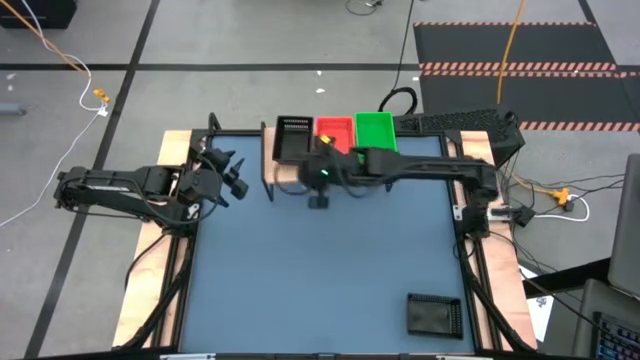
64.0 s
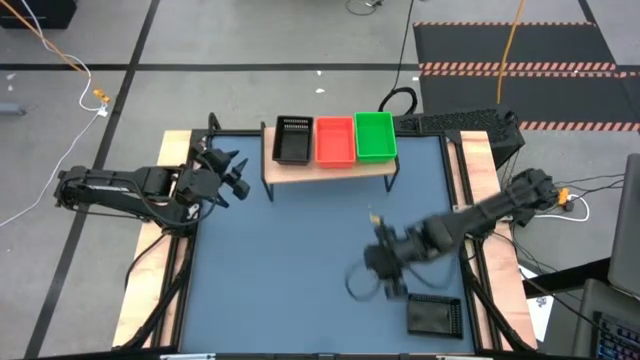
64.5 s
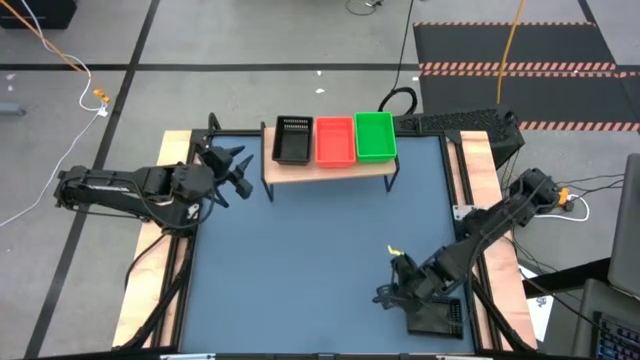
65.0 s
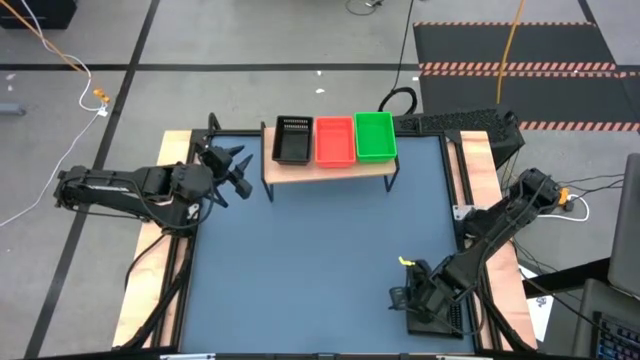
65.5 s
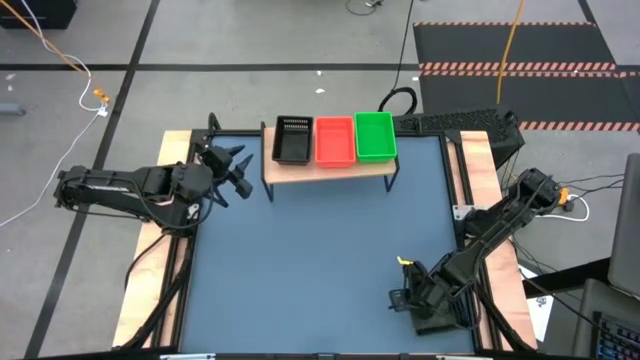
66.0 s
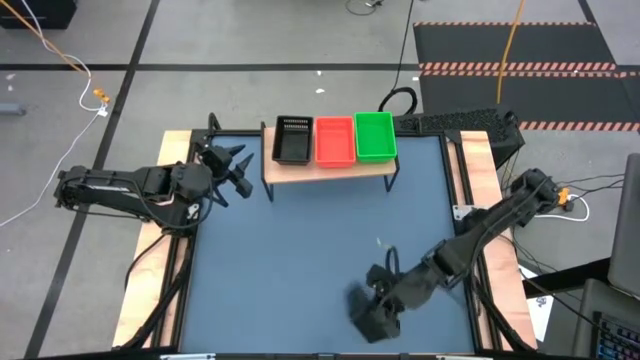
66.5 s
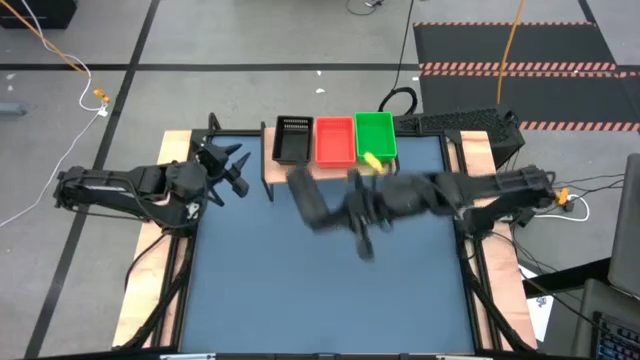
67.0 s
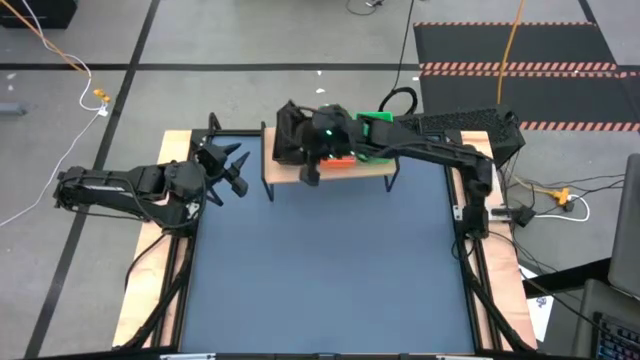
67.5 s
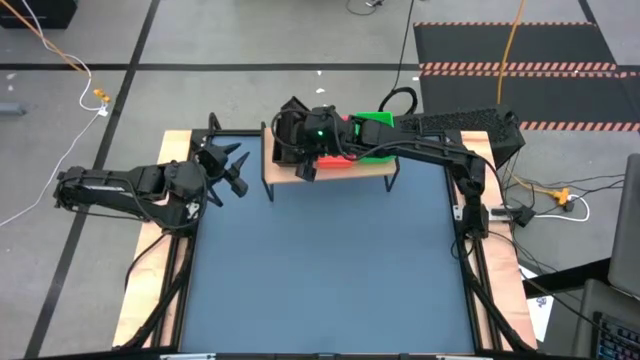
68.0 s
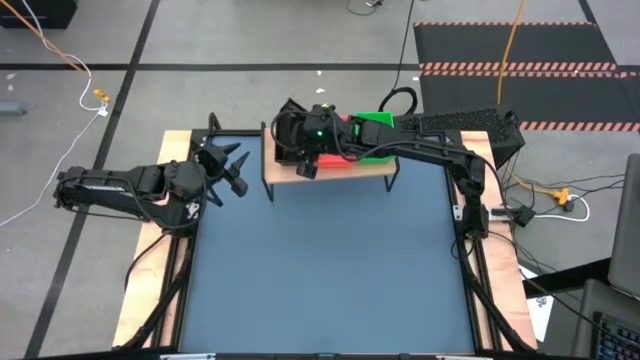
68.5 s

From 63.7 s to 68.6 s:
Task: Stack baskets on shelf by color
Stack the black bin on top of the black bin on the shelf

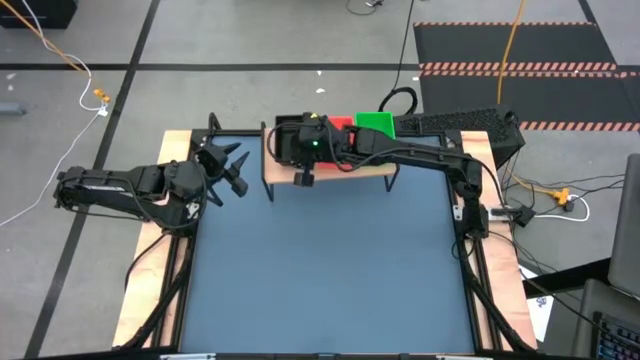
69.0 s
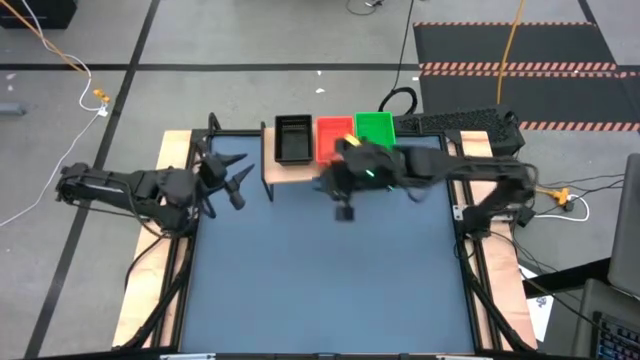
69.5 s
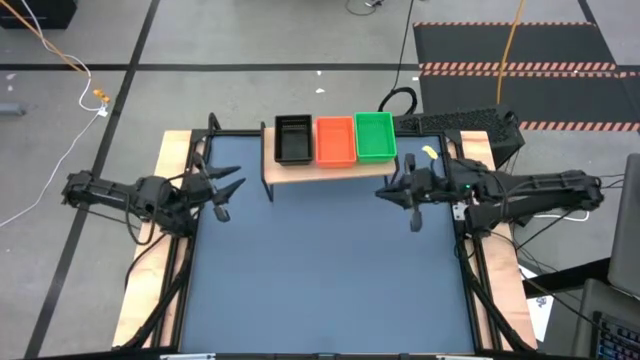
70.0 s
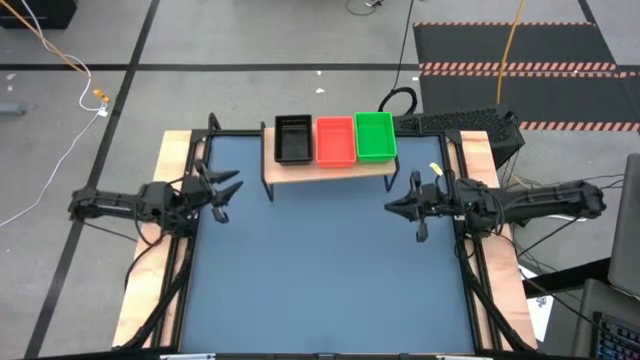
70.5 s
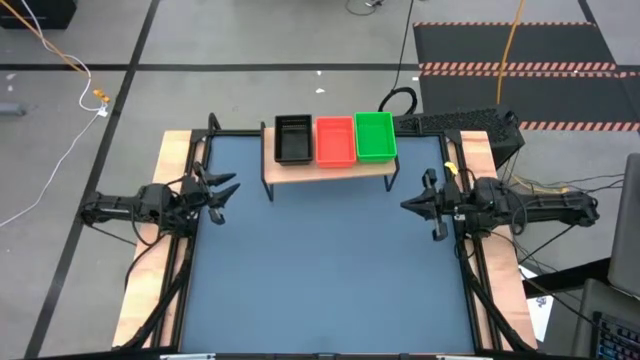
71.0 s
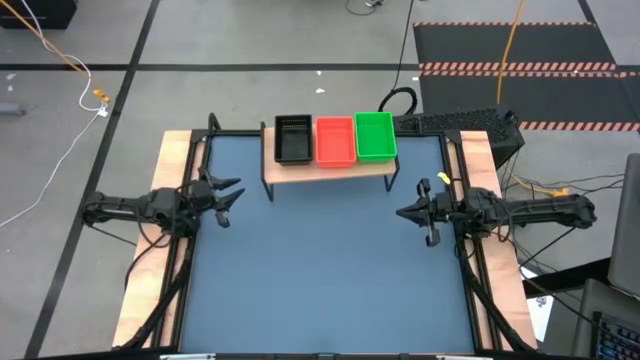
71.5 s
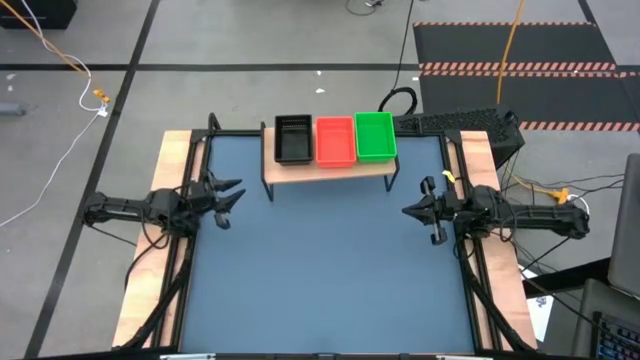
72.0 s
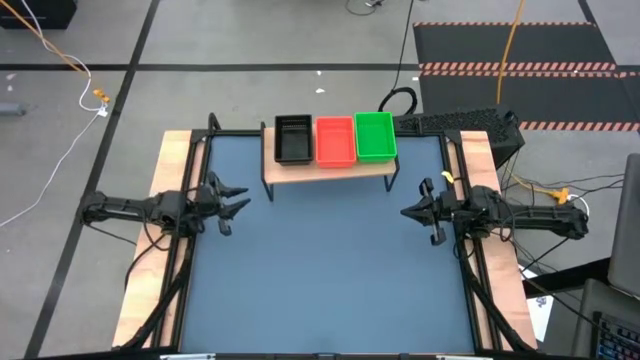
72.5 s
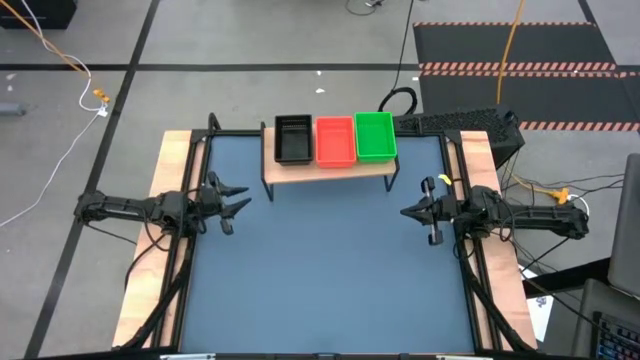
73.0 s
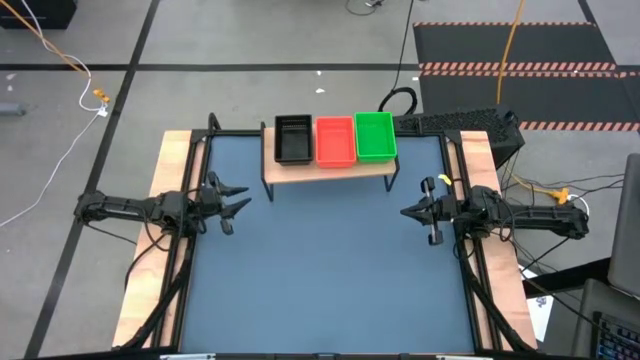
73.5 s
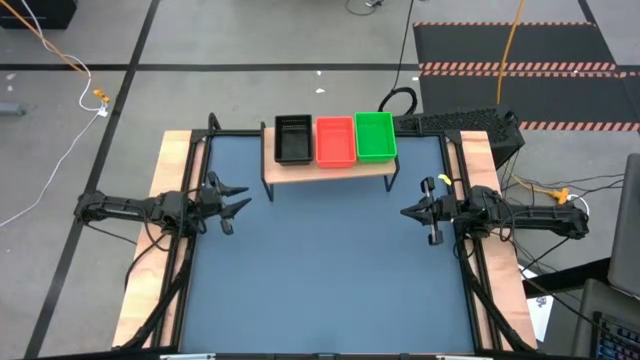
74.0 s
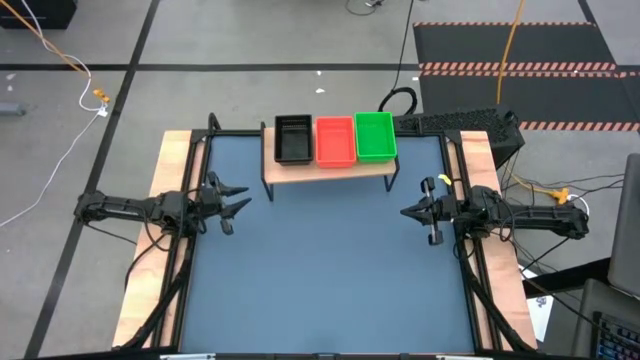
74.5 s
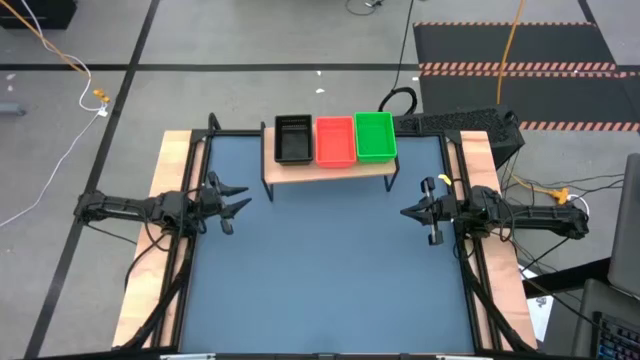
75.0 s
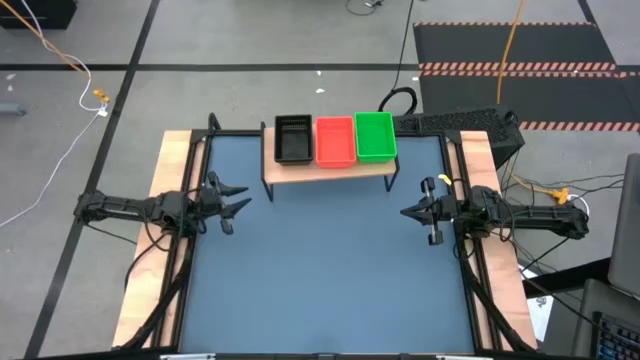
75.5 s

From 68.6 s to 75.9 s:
Return to Home Position

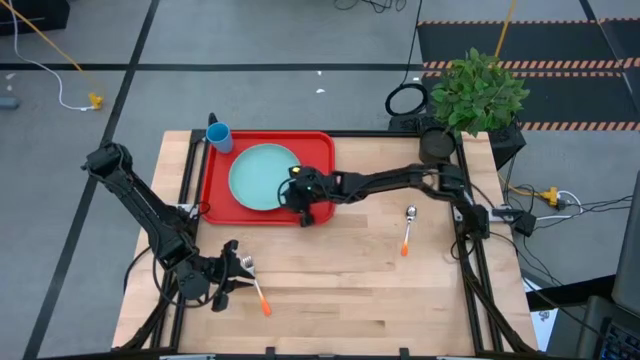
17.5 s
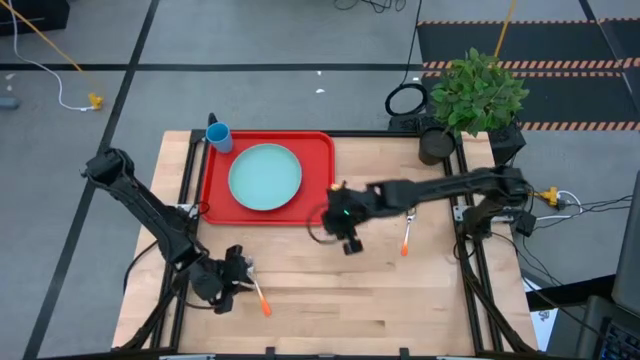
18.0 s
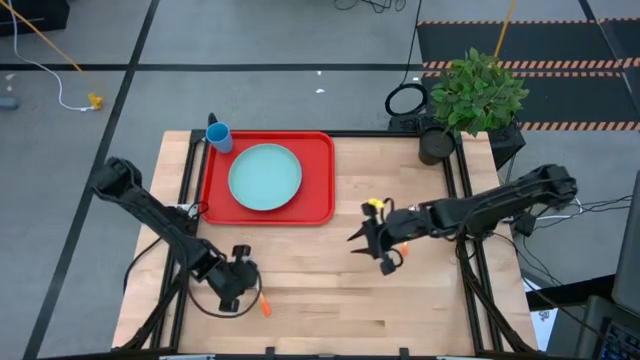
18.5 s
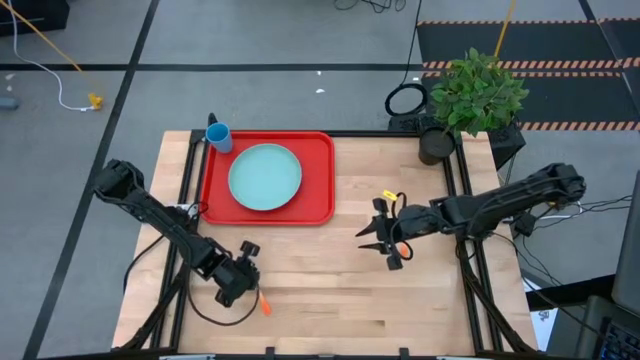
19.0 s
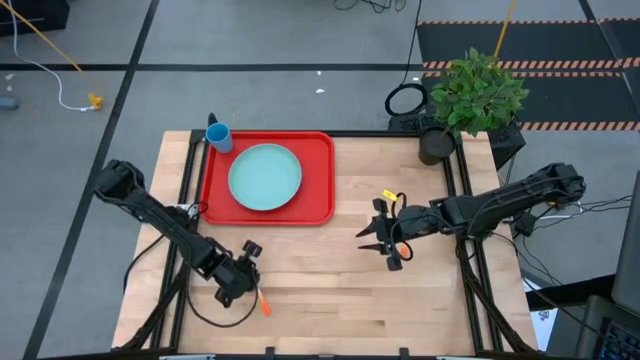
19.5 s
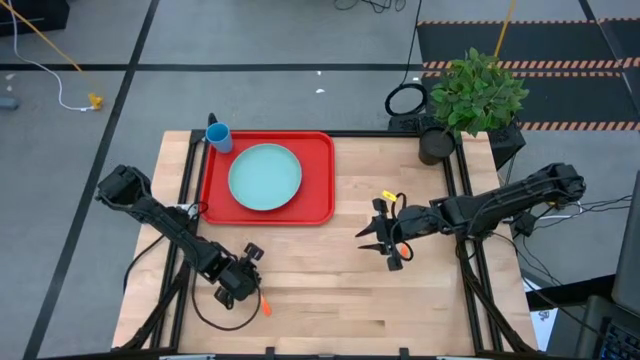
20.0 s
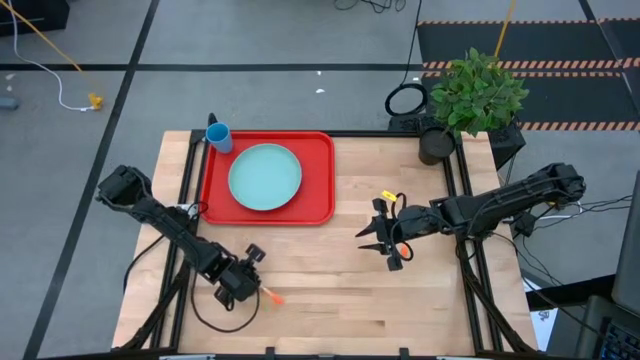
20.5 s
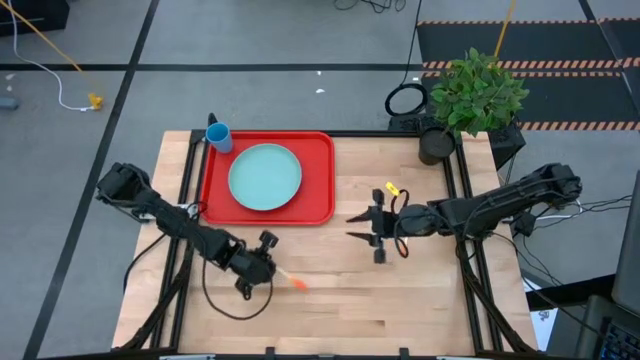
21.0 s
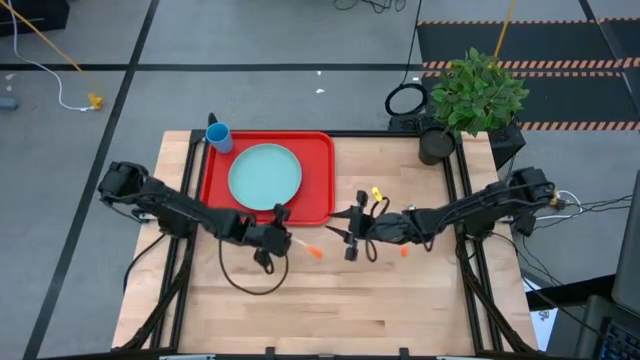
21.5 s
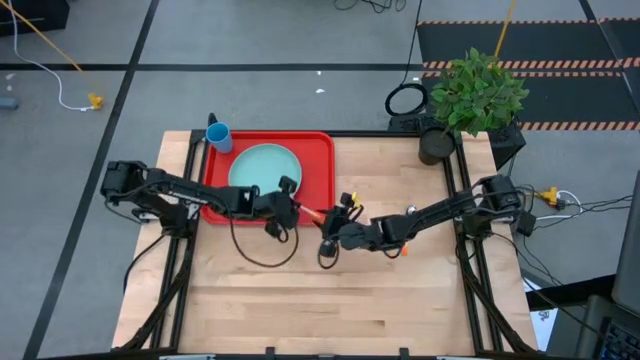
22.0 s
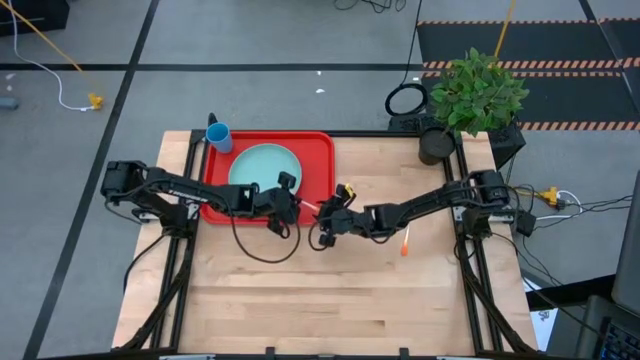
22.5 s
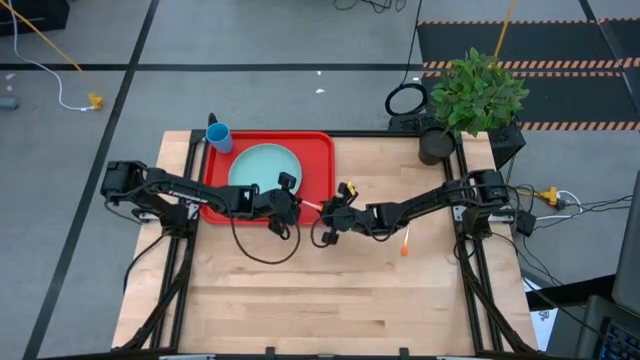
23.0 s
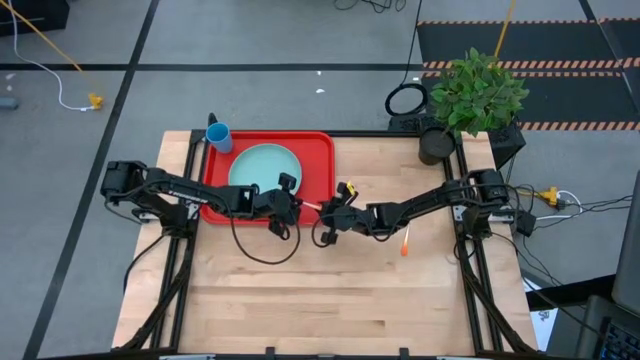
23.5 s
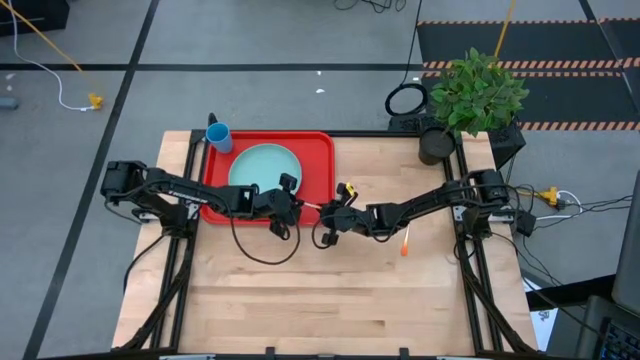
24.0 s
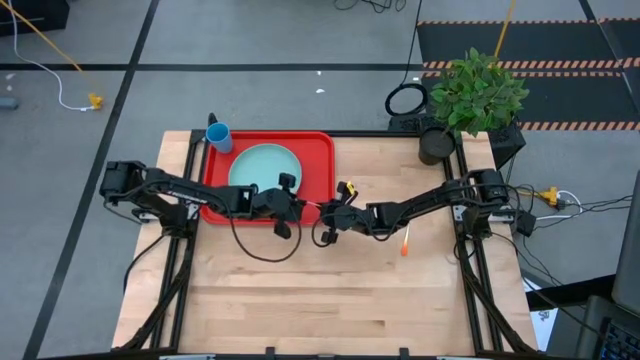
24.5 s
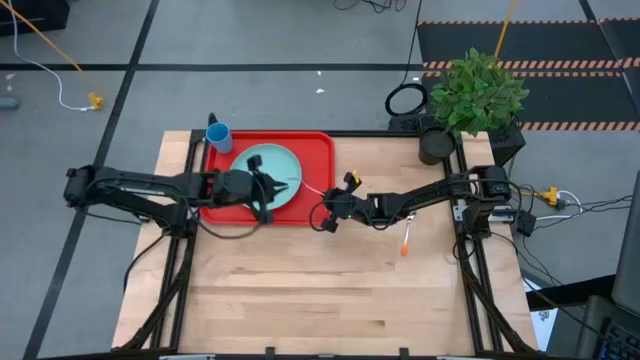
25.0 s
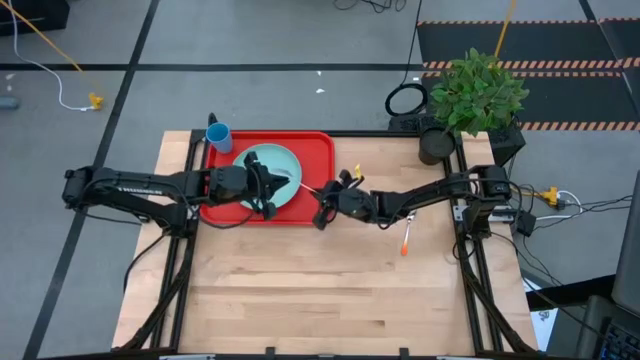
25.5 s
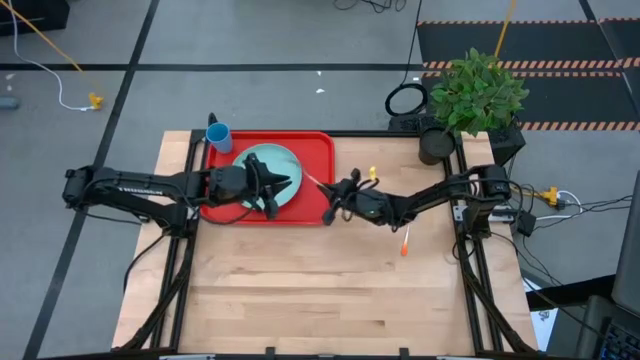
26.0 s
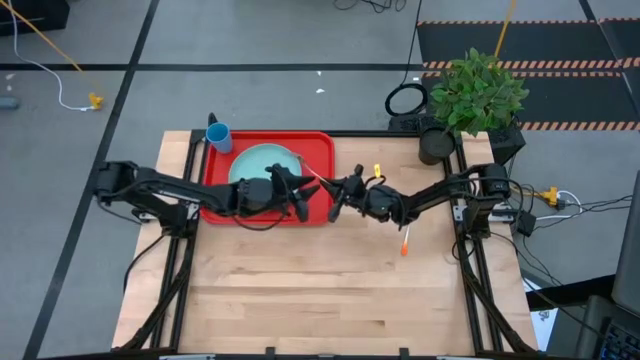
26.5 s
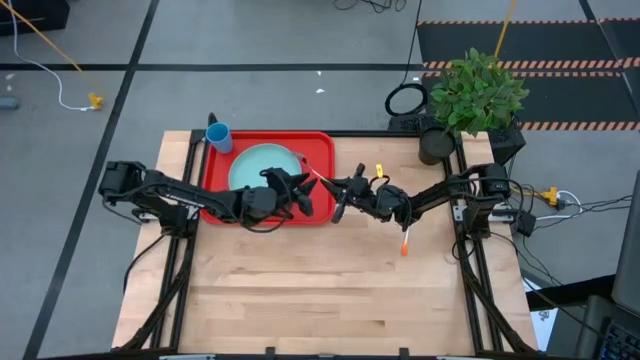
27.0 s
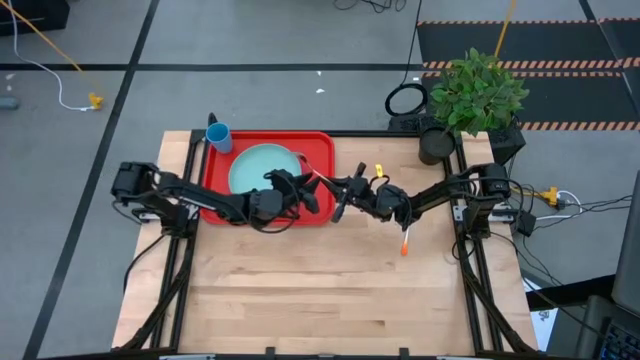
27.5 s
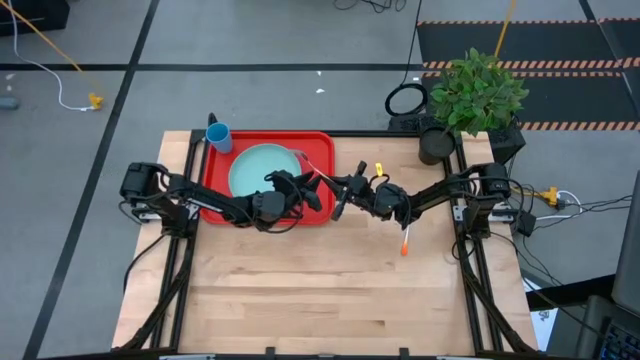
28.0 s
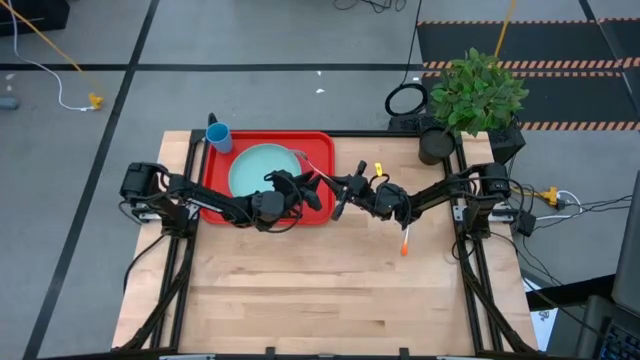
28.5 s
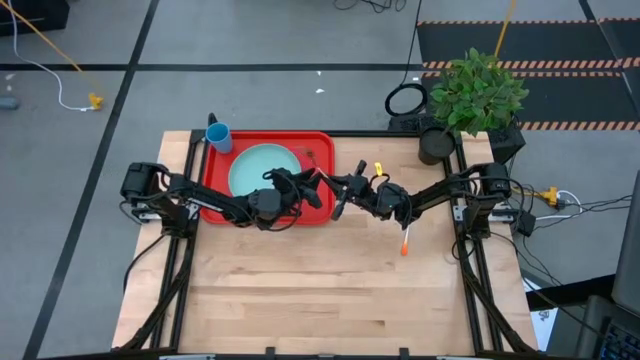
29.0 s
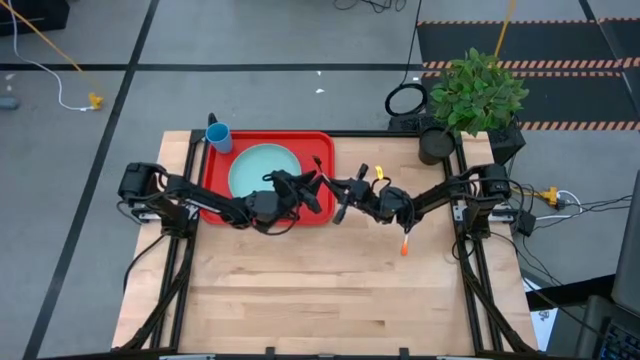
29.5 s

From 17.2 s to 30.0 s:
Task: Pick and place plate/cup/fork/spoon on tray
Put the orange fork on the red serving tray to the right of the light green plate
